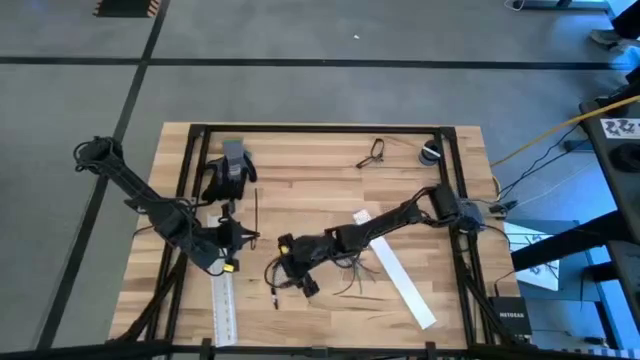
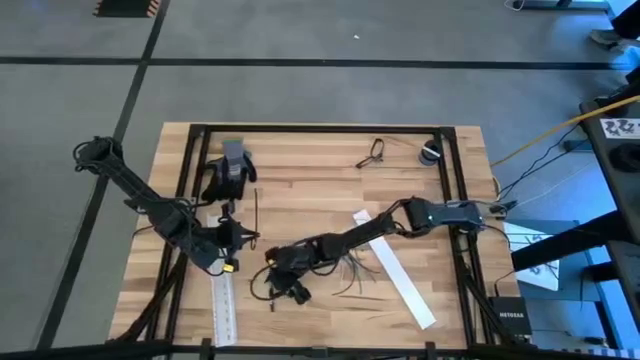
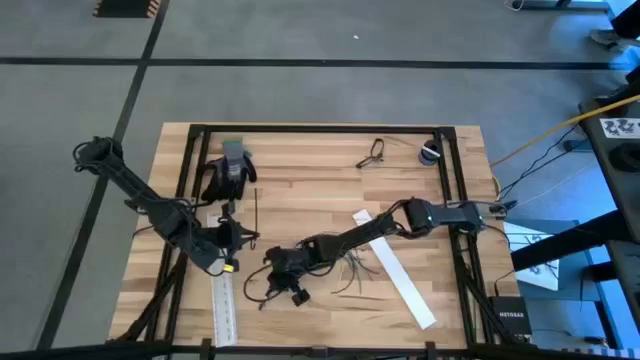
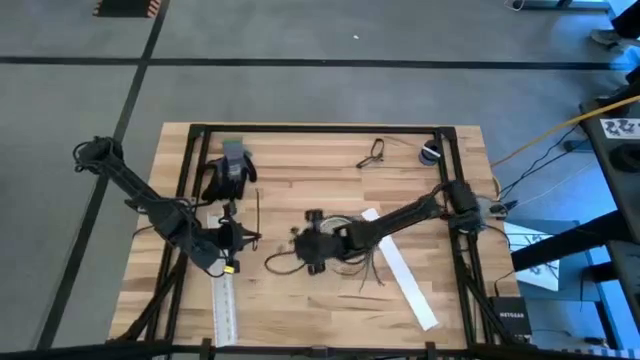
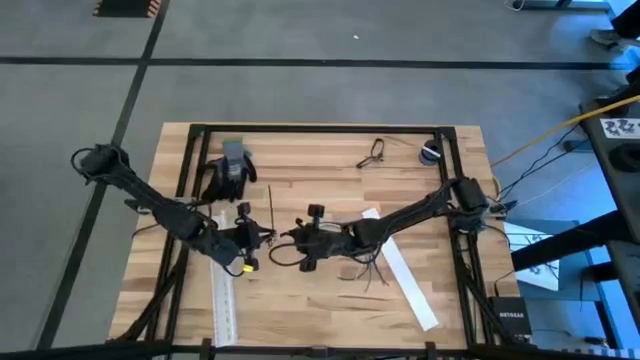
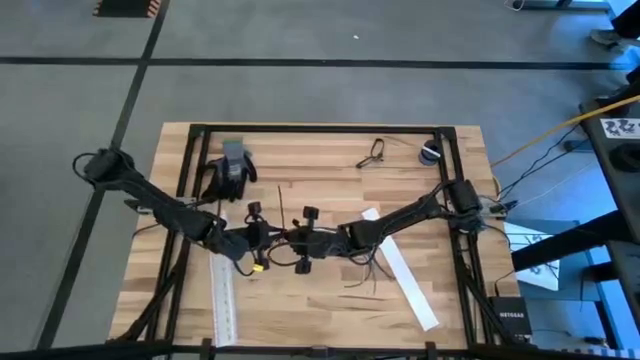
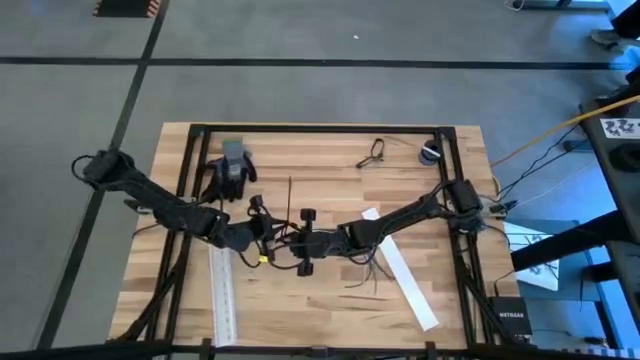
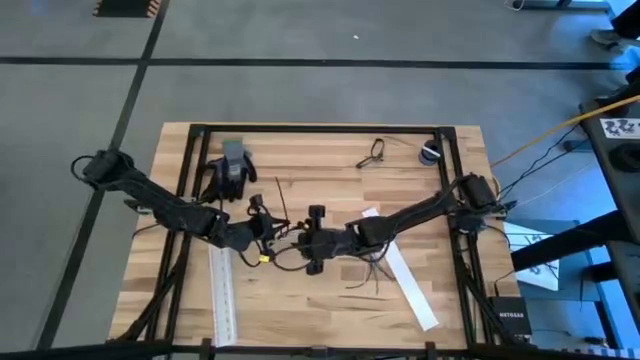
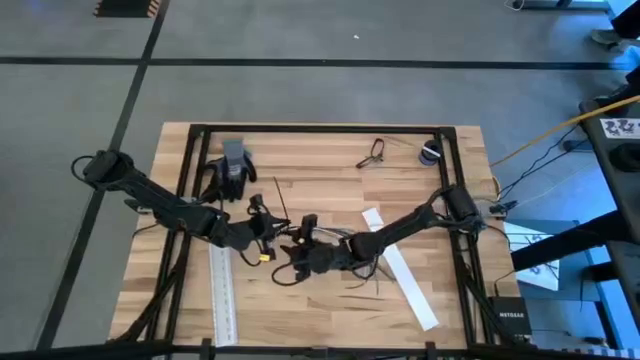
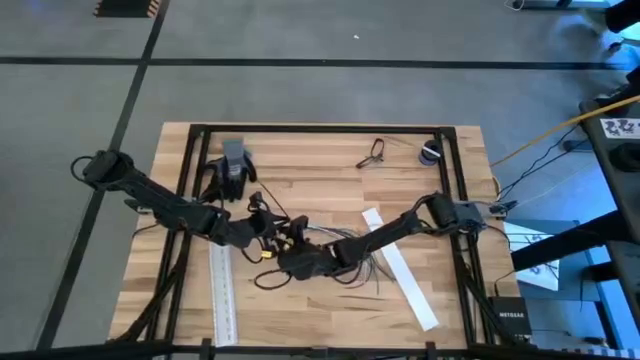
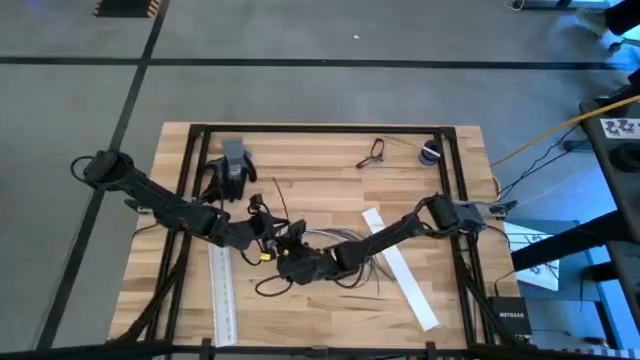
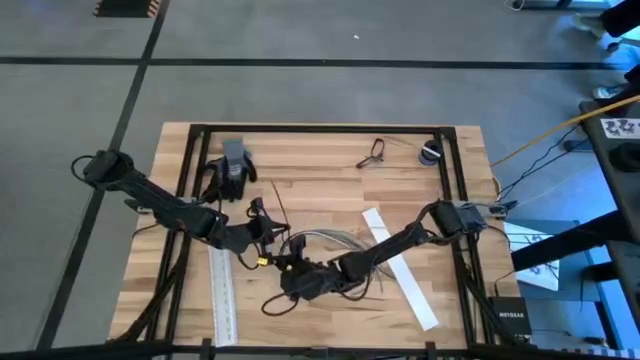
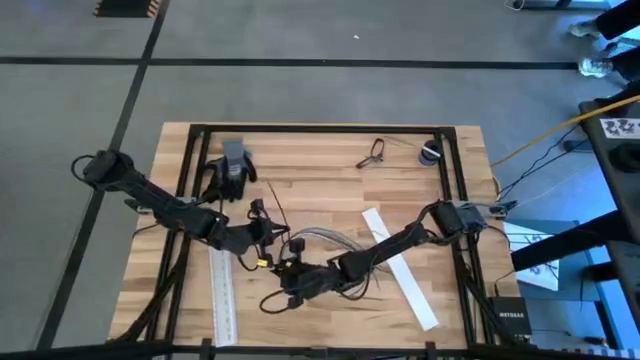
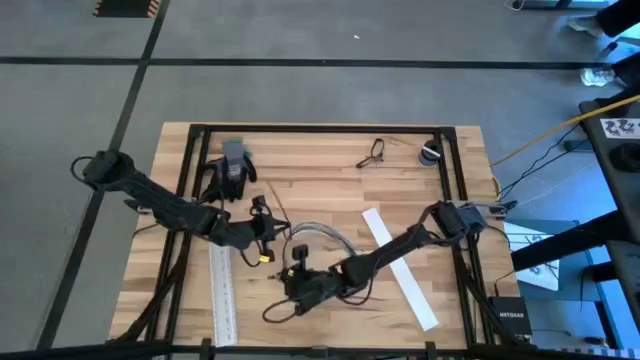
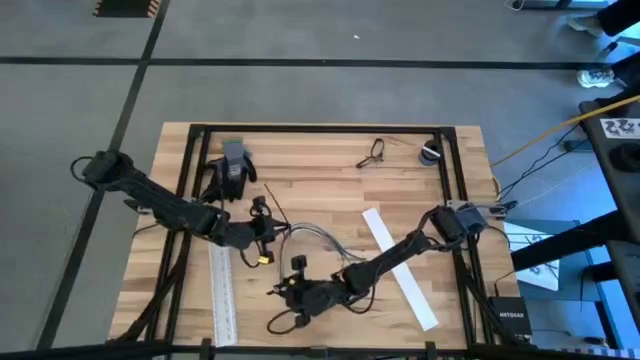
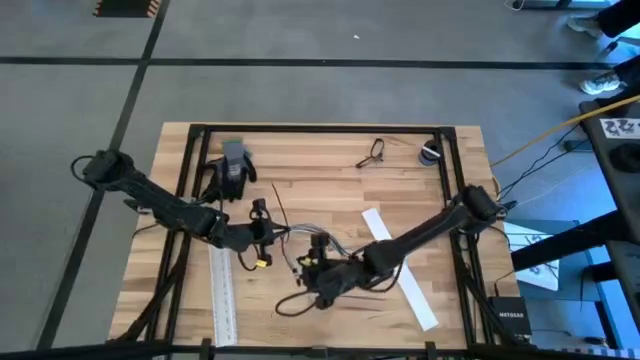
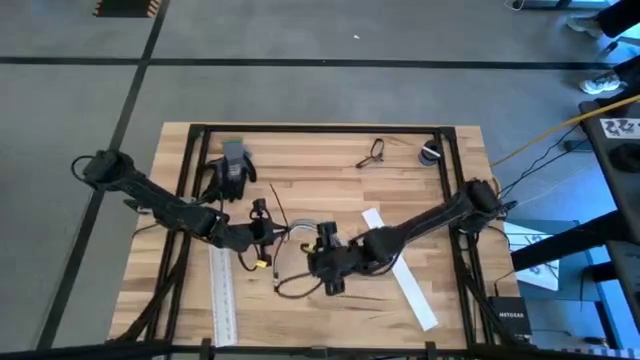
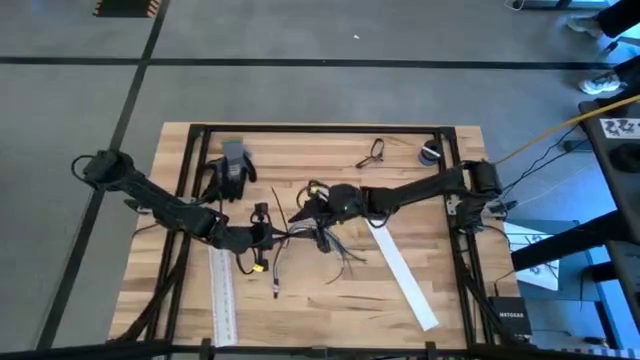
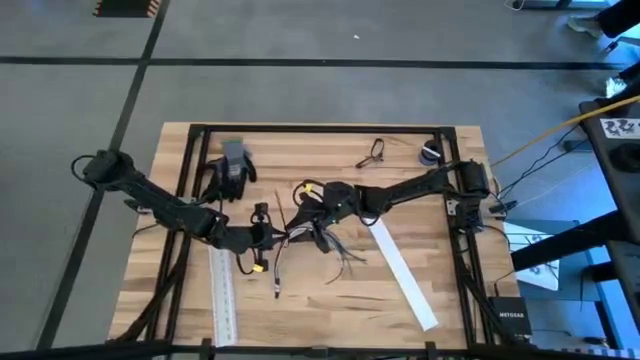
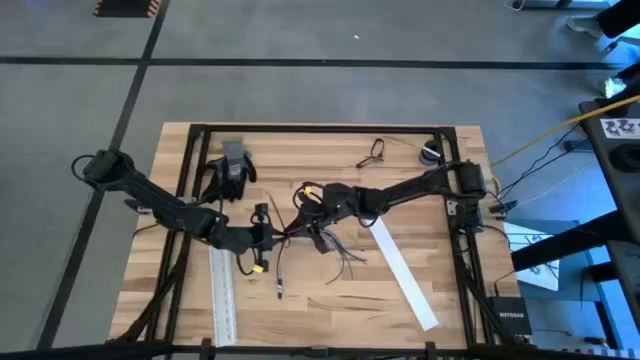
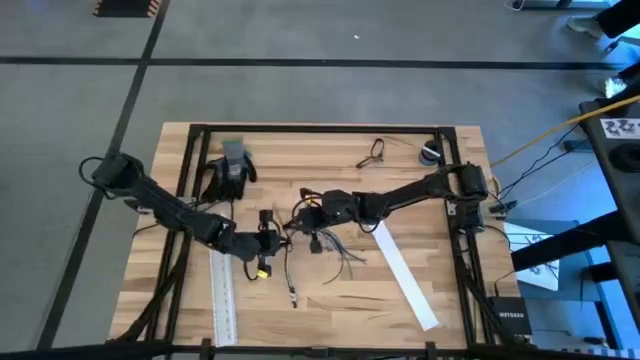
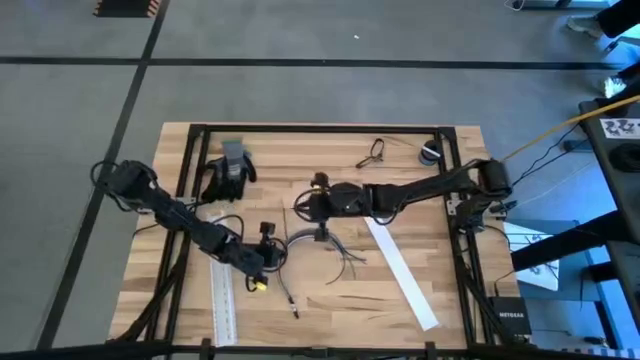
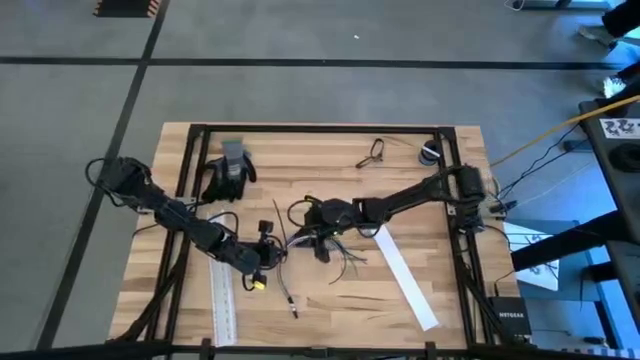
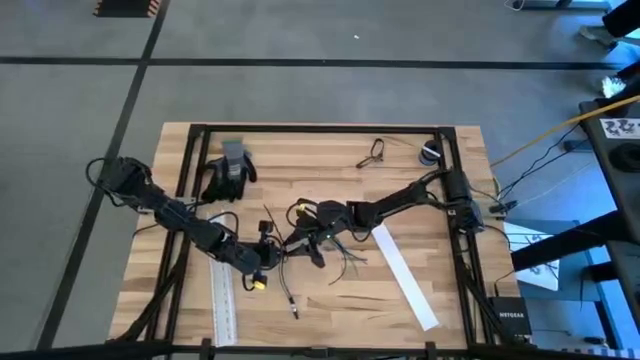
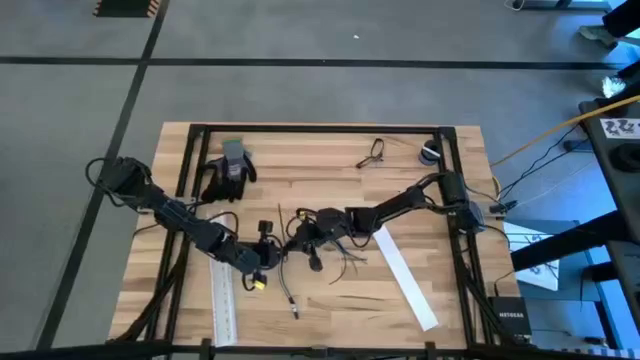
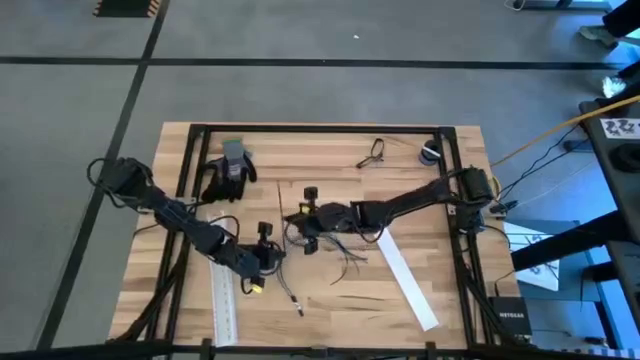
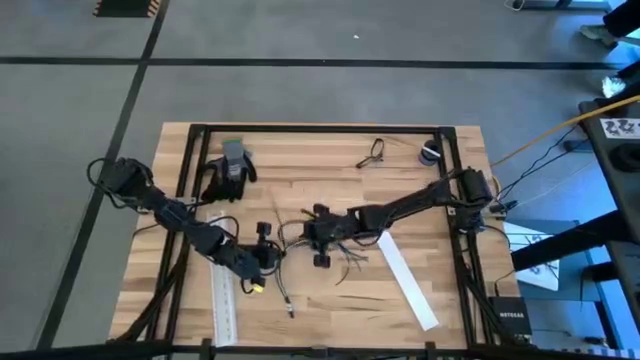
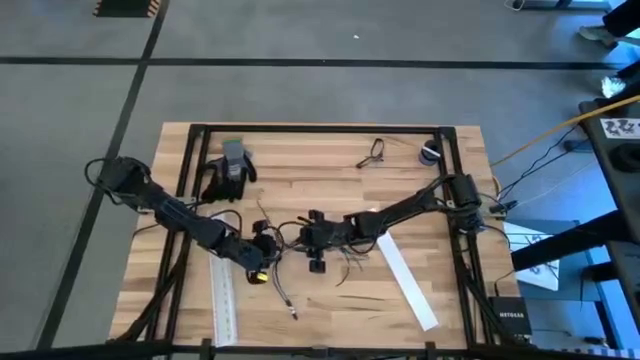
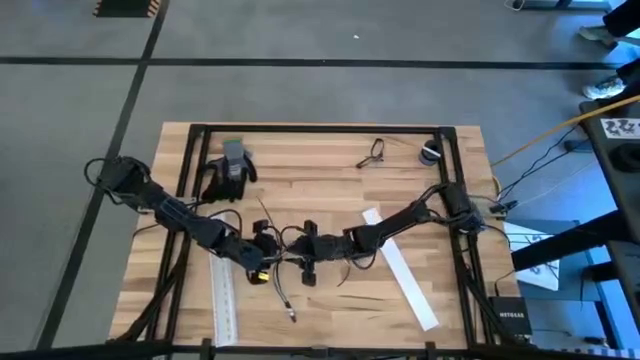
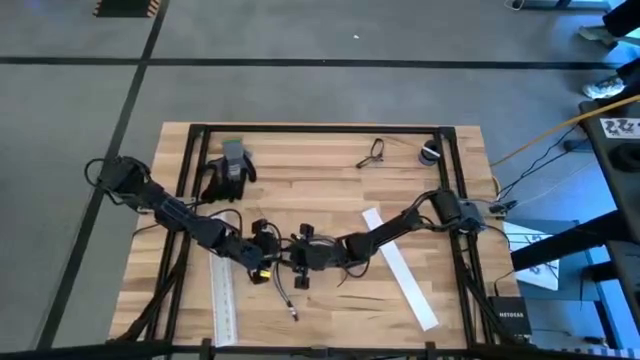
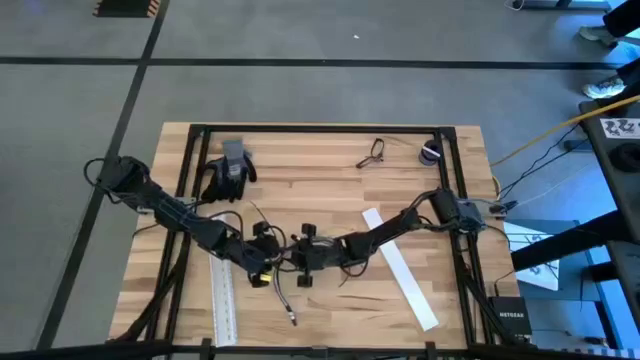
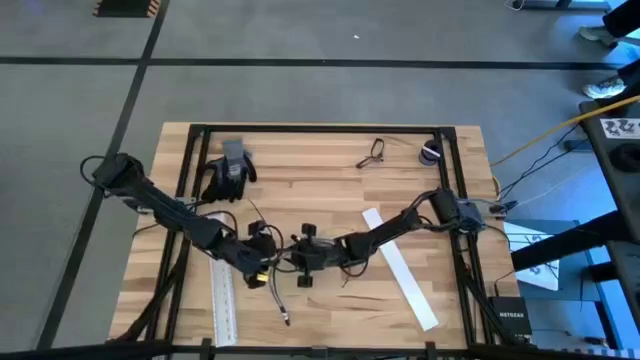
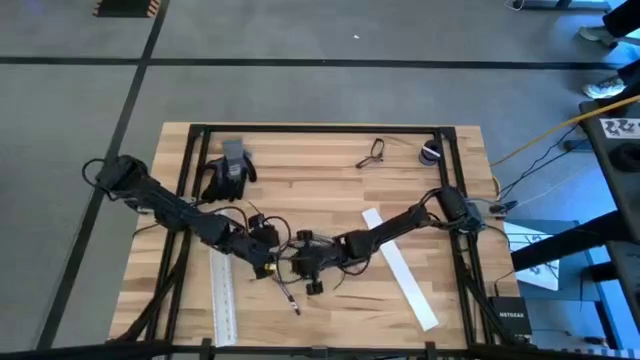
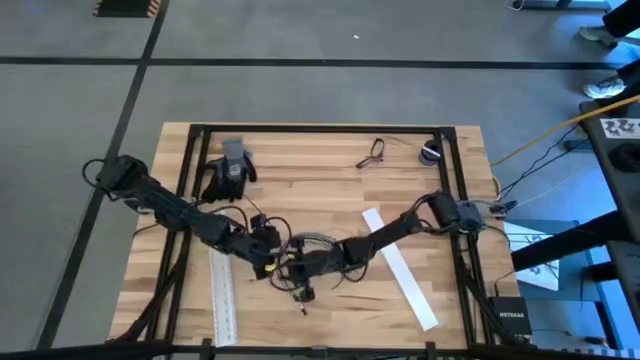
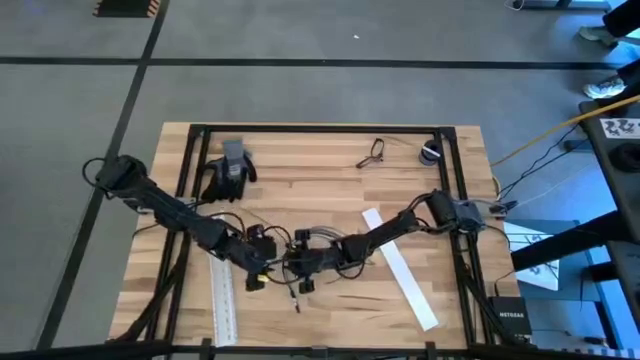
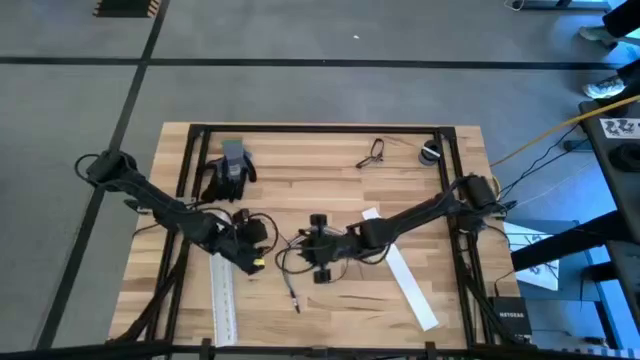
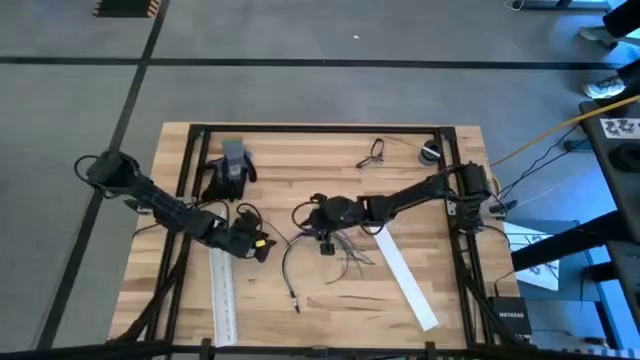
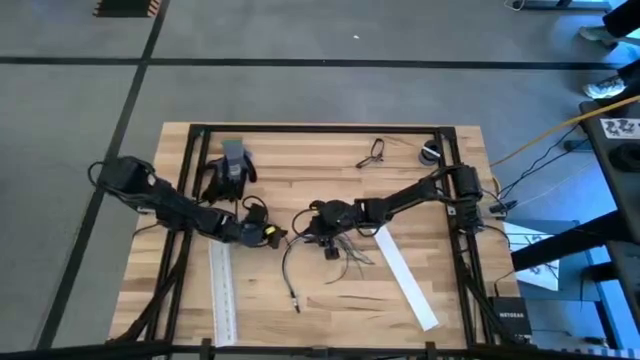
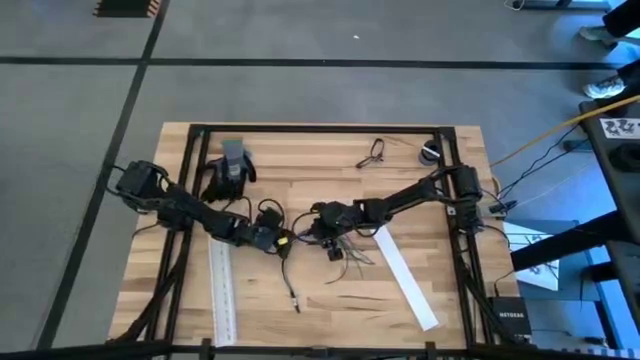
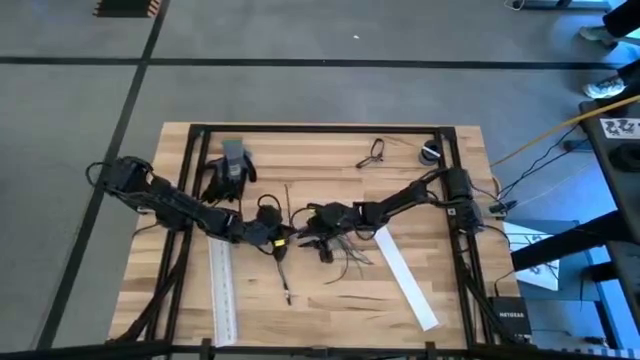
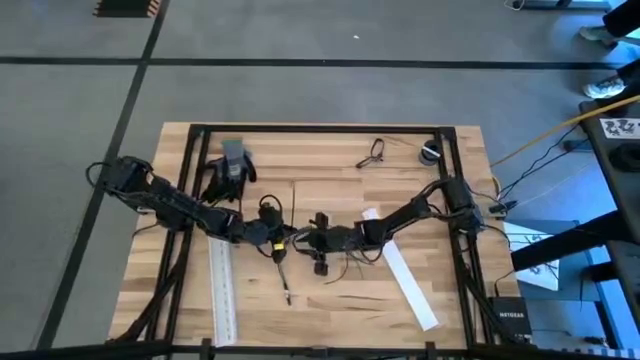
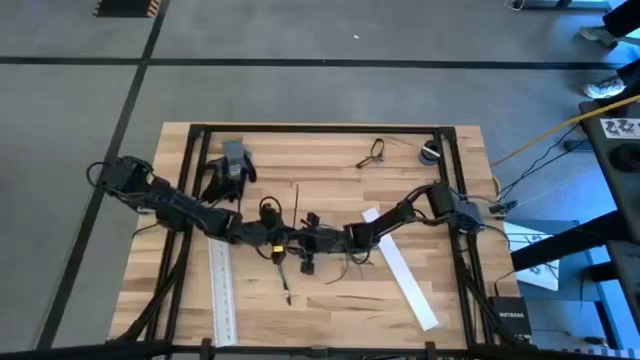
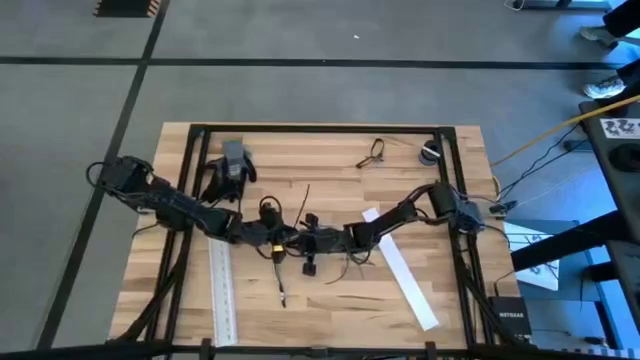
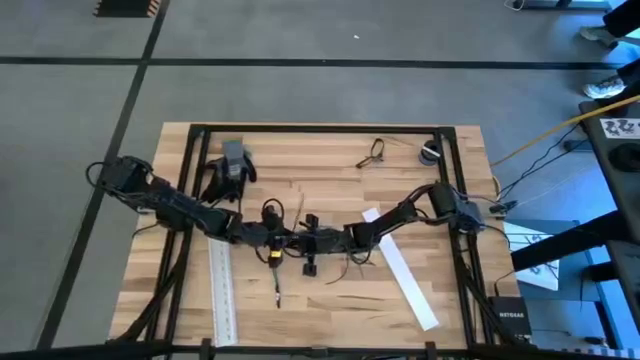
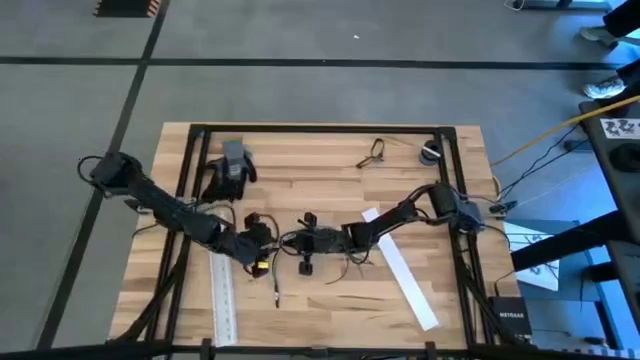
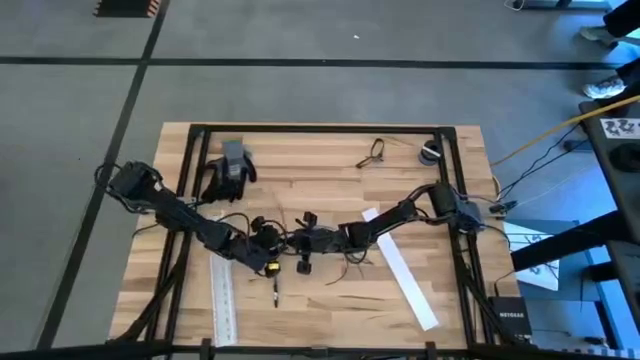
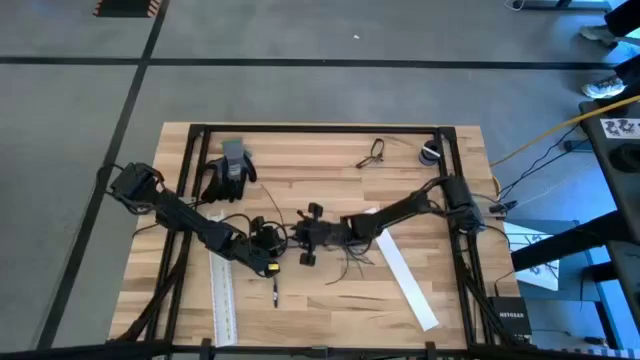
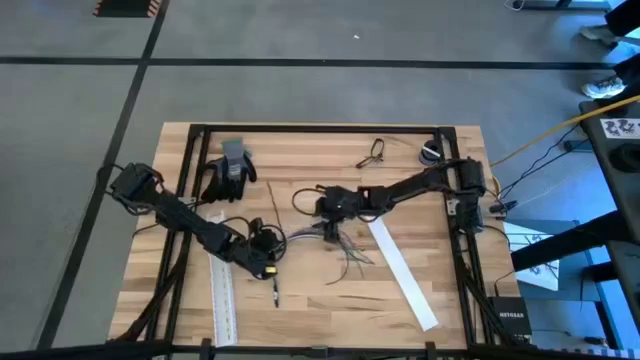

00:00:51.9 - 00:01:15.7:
Task: Ziptie cables
Put the black zip tie on the cable wires
